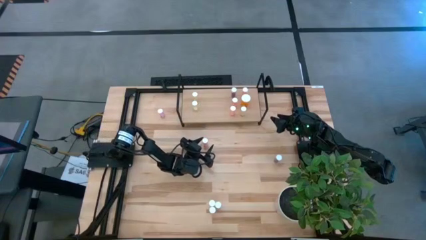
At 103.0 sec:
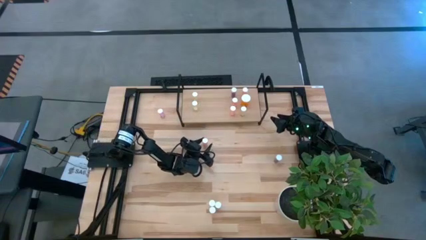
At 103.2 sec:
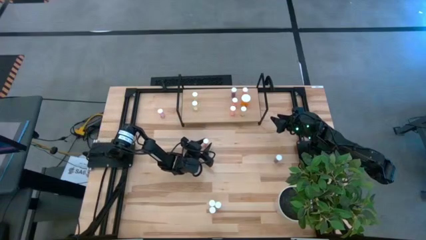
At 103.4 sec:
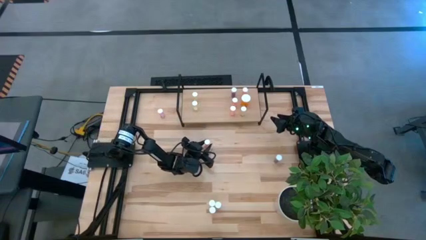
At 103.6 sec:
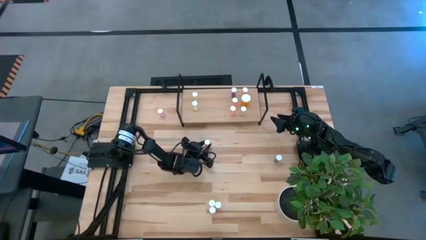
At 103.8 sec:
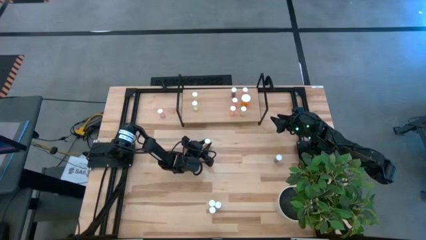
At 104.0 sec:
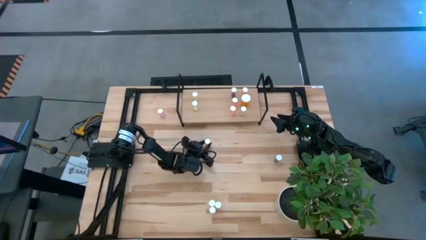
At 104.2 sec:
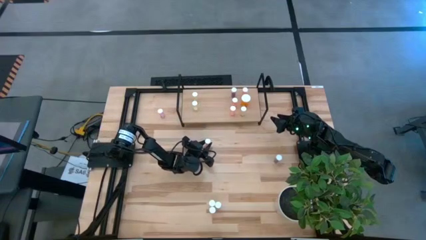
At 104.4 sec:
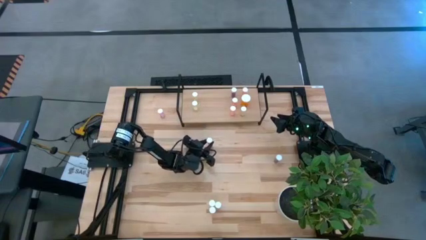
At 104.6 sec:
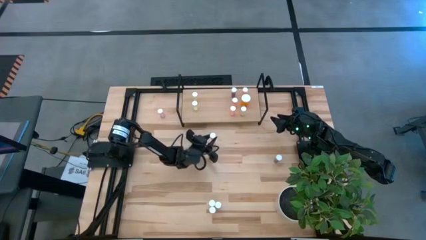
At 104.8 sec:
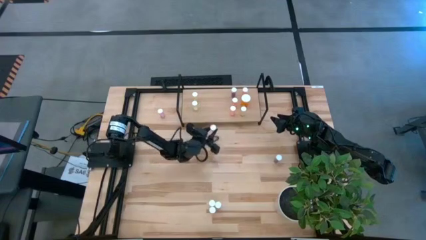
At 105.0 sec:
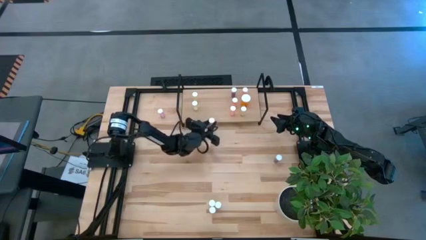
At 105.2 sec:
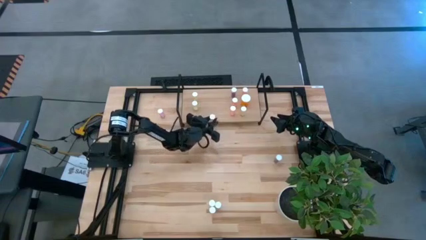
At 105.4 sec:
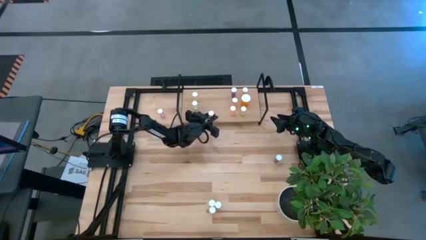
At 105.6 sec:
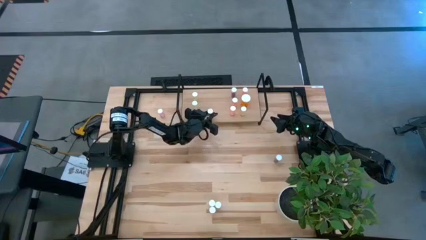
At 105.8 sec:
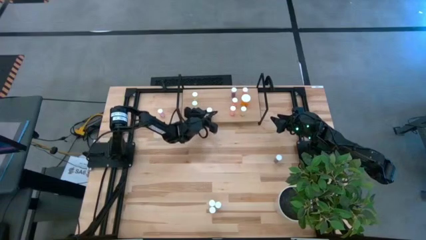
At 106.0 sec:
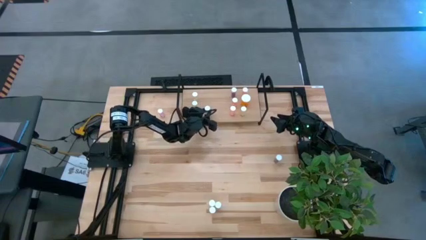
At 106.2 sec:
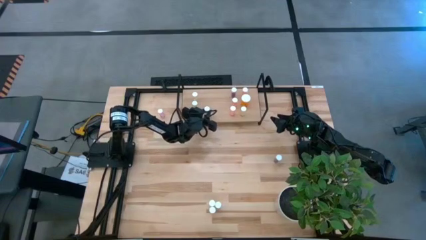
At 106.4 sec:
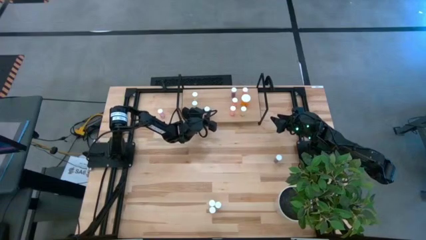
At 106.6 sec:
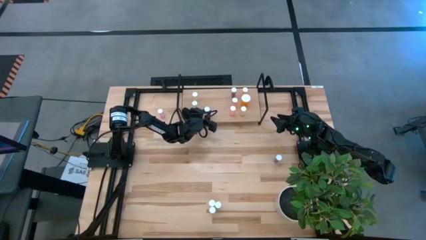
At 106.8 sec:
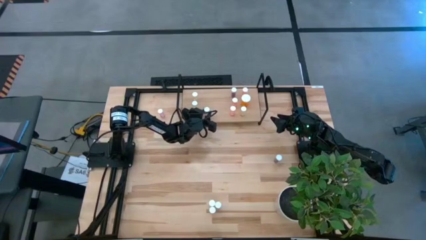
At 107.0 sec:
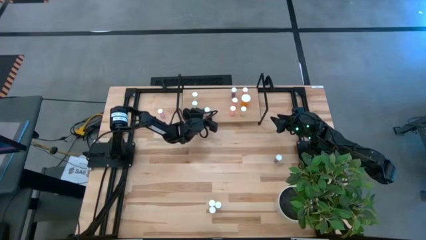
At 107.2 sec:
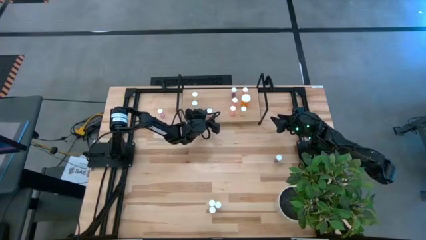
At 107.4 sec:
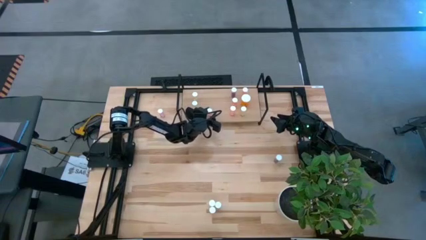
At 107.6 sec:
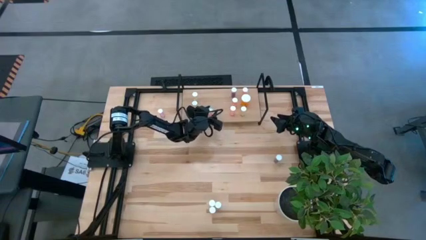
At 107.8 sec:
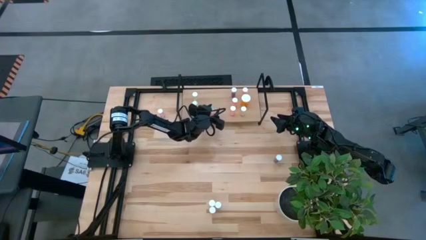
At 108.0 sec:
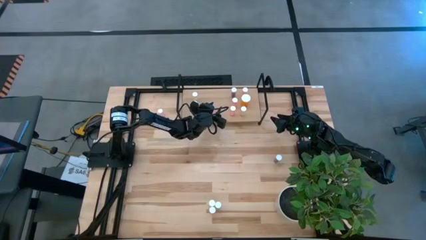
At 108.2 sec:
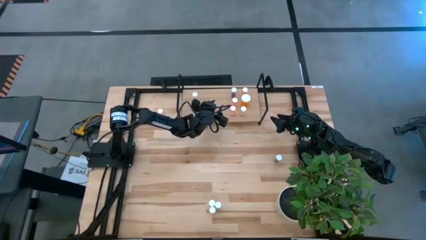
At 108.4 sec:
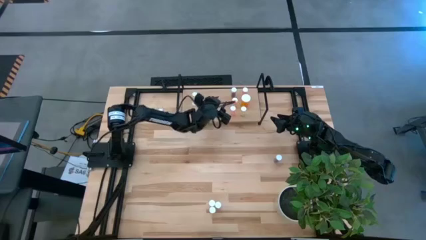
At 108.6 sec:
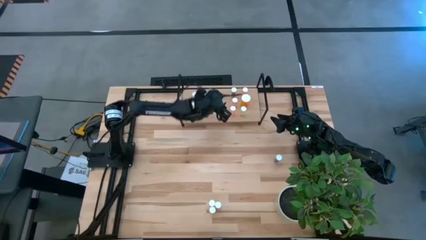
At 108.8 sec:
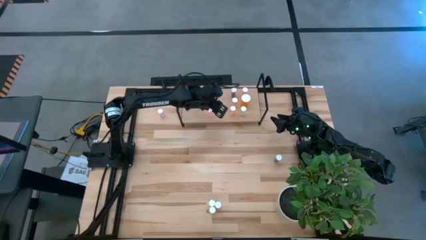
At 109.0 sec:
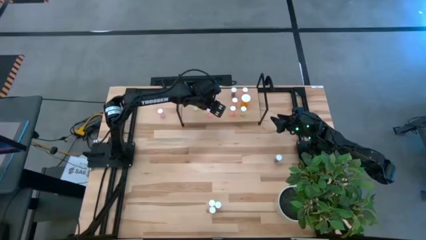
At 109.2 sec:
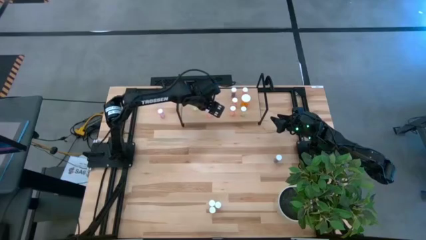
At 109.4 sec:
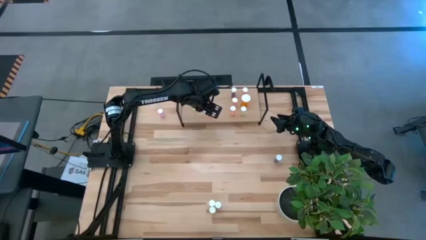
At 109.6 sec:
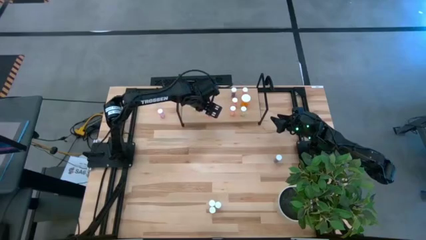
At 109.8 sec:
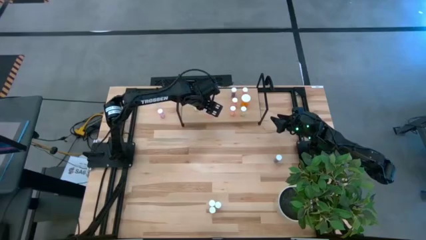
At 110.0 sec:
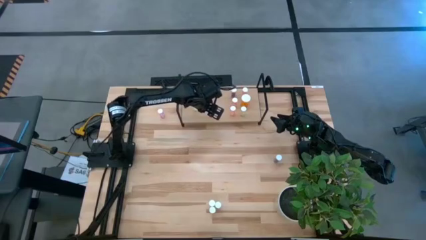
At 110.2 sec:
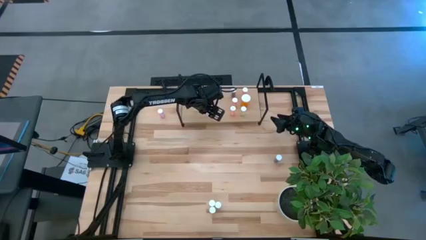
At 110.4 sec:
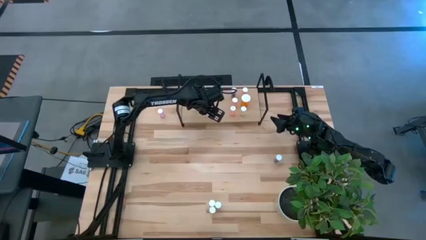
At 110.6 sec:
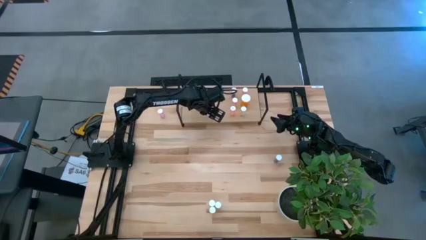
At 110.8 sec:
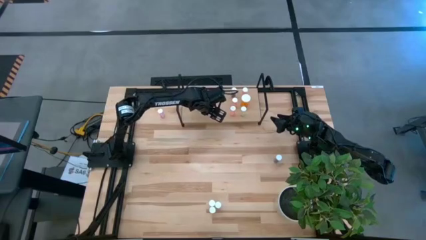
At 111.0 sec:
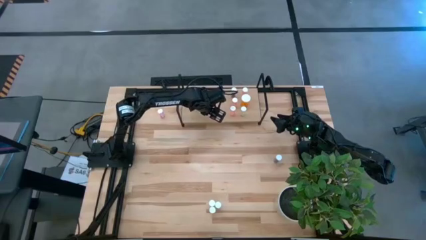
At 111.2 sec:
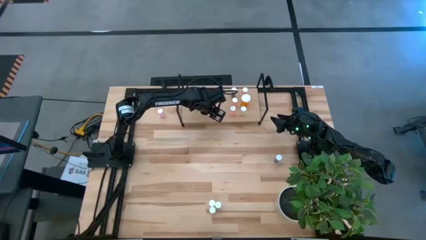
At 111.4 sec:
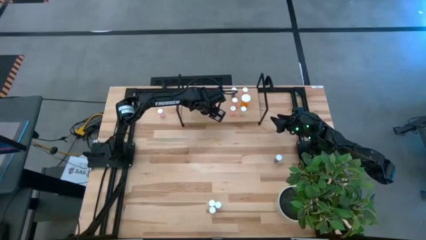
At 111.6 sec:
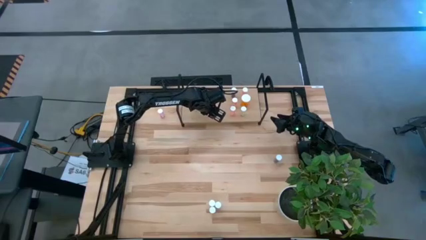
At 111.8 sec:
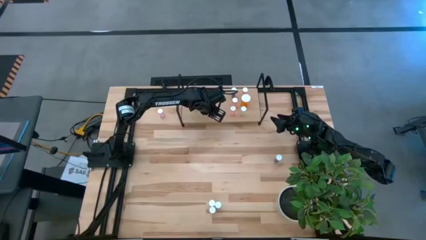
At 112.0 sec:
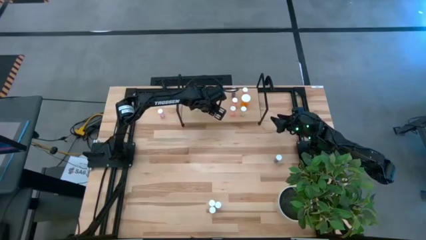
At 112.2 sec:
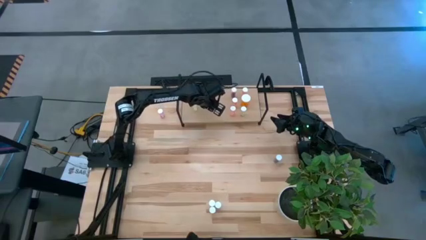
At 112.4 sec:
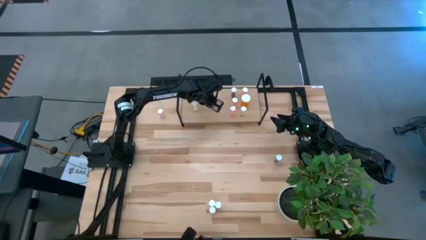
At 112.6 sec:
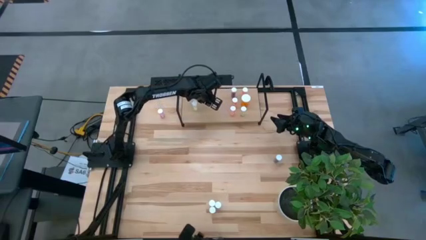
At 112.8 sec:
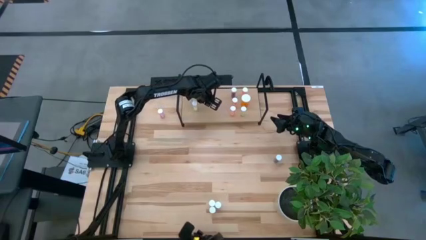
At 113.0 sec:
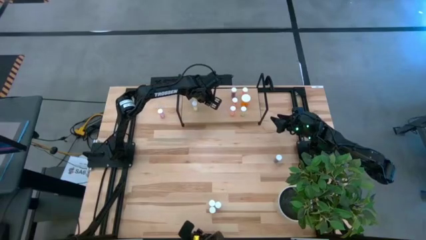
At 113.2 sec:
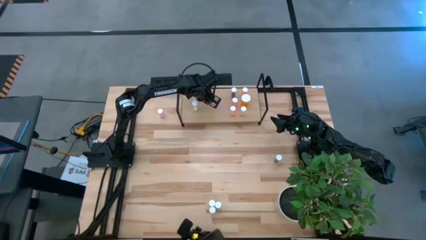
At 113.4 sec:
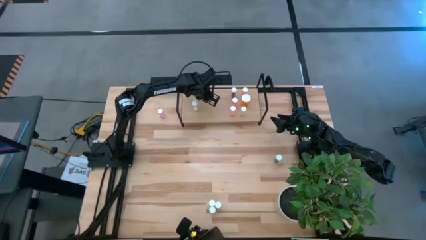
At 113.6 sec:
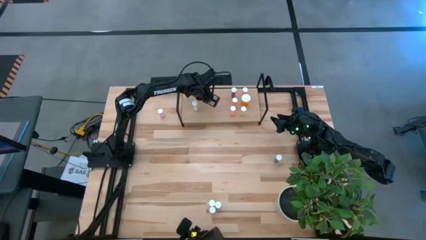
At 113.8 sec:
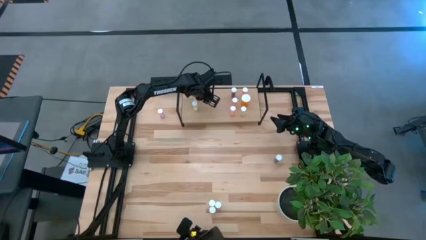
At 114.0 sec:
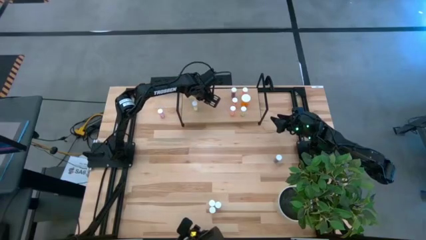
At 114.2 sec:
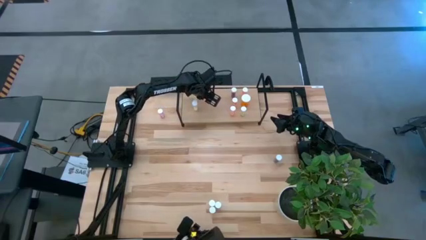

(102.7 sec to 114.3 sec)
Task: Pick and place medicine bottles onto shelf by color
Put the pink pill bottle on the shelf

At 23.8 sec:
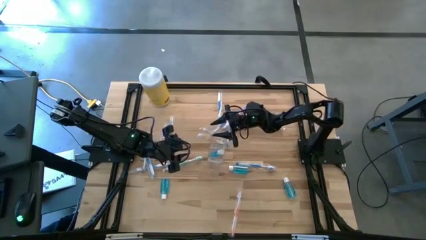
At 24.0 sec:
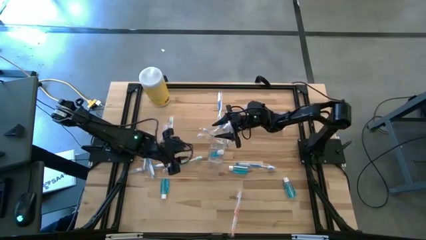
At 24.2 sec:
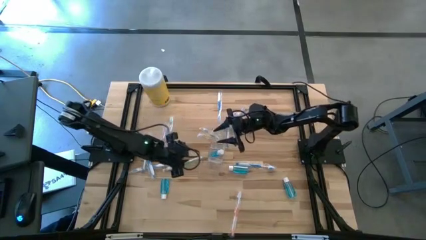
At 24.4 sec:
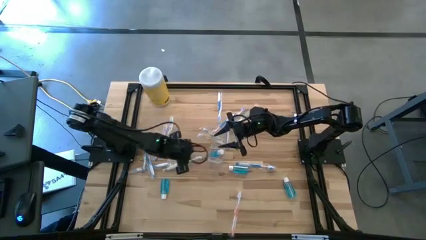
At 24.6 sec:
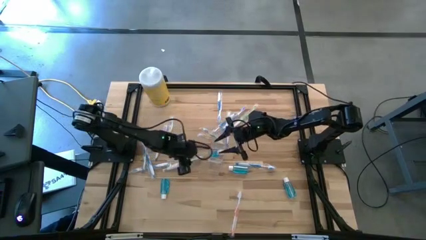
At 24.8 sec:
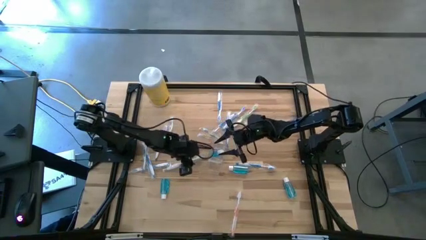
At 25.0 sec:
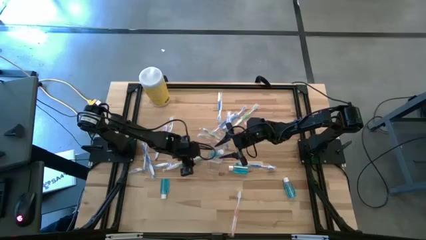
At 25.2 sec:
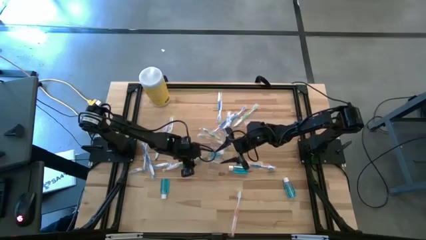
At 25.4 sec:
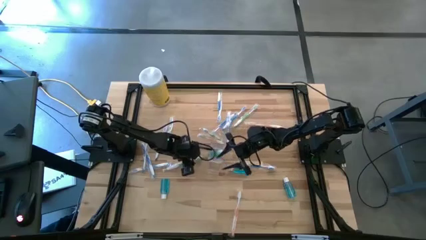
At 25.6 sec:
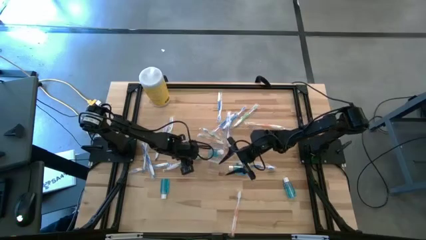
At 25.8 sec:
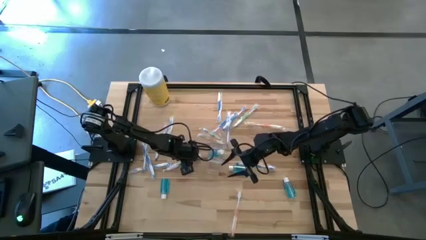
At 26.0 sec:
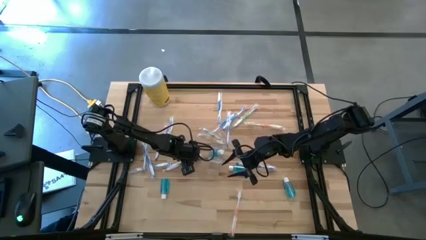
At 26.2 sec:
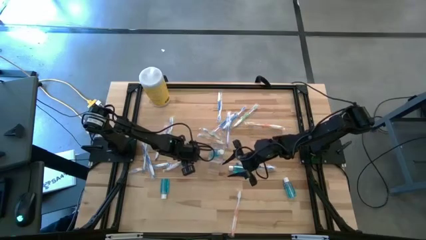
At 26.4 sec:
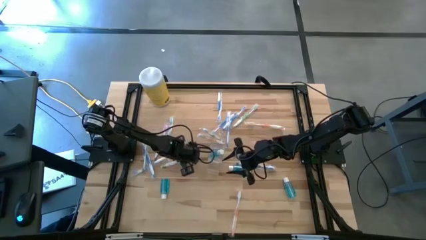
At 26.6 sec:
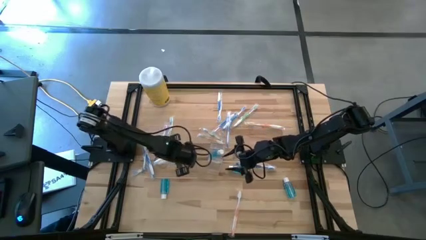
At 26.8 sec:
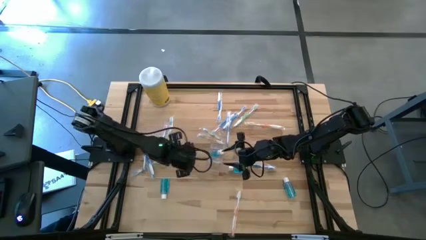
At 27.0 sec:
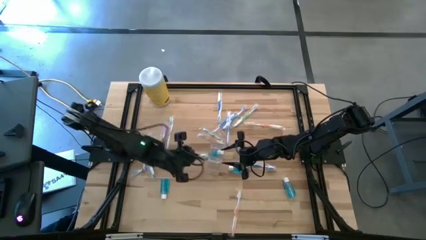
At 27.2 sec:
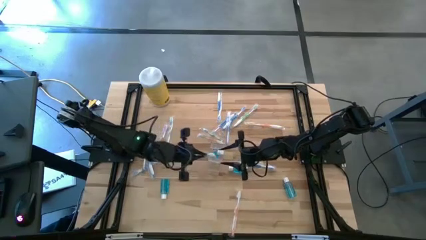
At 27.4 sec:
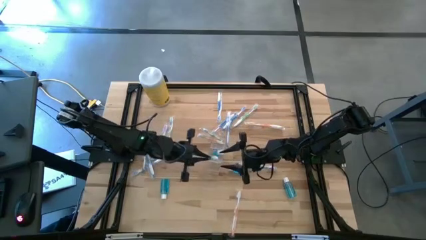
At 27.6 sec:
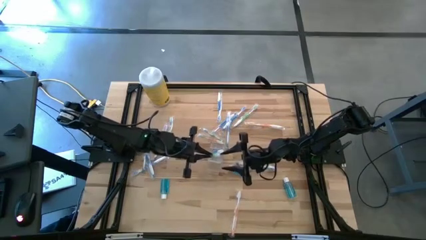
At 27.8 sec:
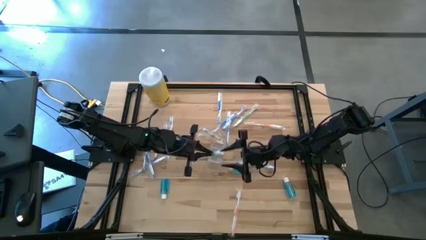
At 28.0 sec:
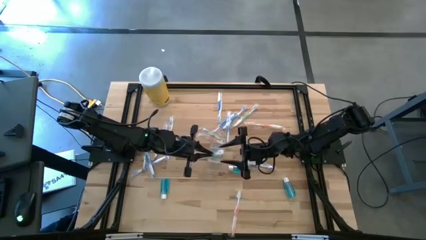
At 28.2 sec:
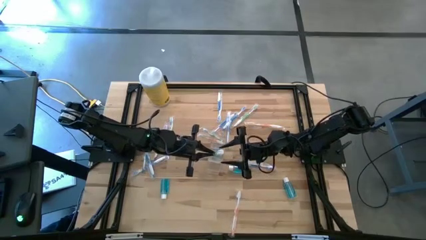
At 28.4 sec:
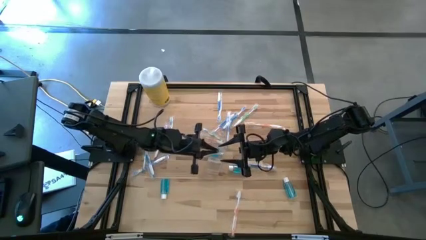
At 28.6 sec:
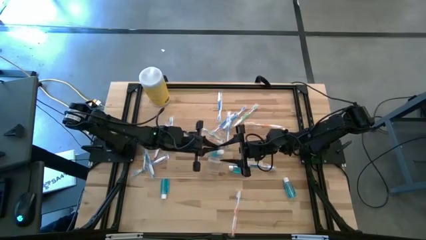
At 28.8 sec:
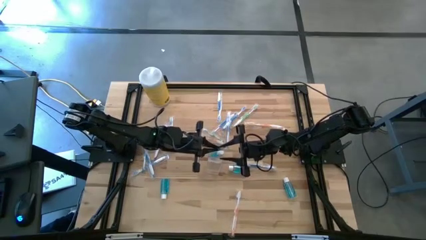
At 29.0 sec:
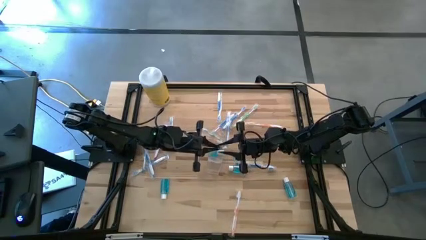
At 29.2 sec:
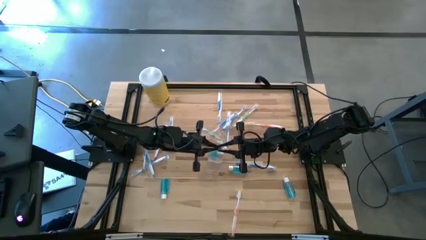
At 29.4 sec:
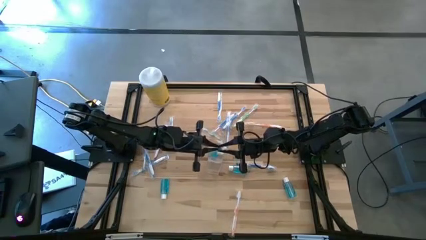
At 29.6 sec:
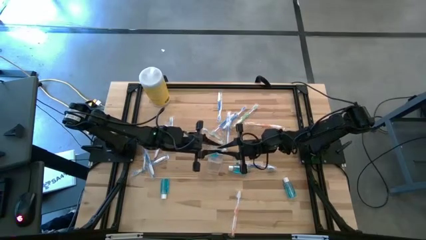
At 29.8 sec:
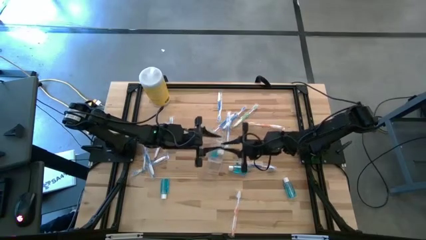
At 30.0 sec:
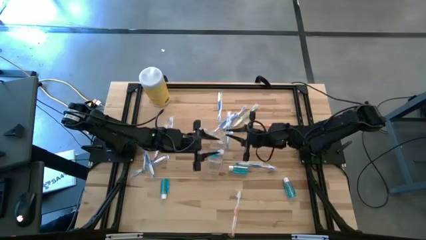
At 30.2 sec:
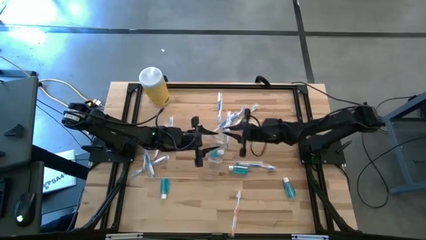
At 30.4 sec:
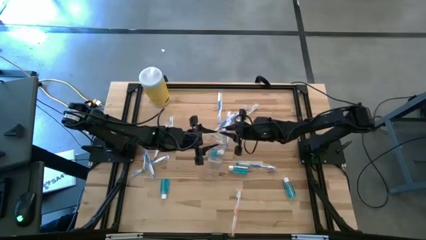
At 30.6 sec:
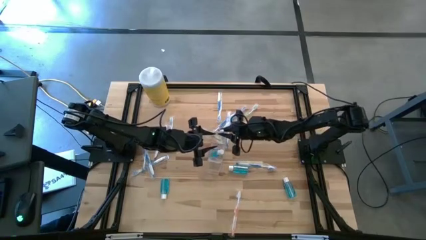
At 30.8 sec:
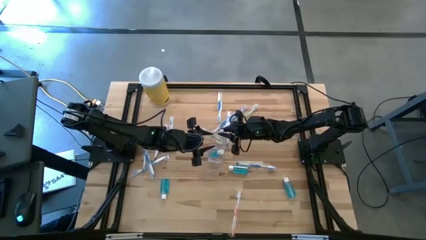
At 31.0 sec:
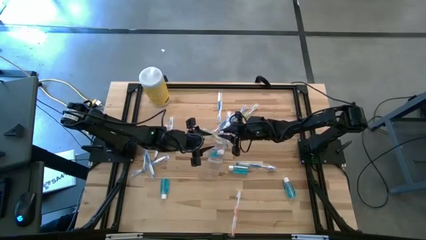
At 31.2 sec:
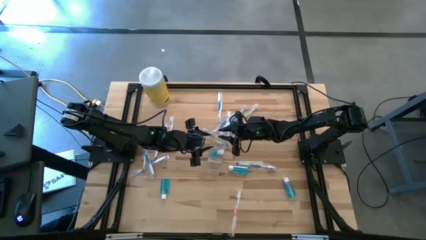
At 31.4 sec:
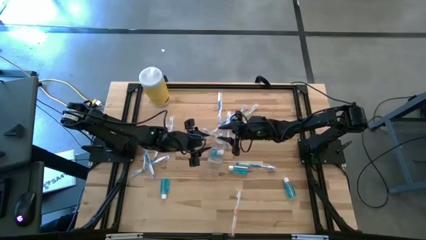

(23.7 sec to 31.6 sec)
Task: Pick & Place toothbrushing station
Put the green toothbrush into the transparent organizer
